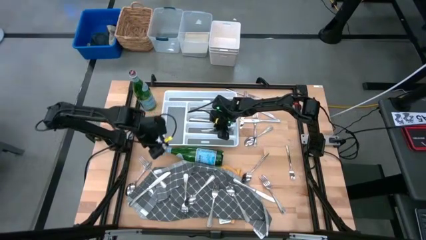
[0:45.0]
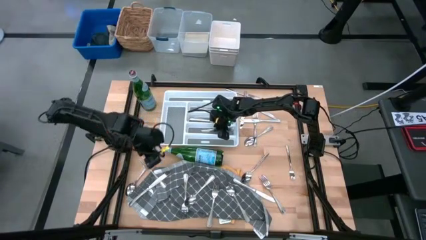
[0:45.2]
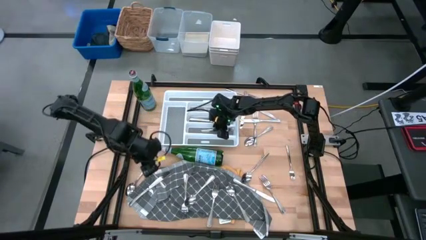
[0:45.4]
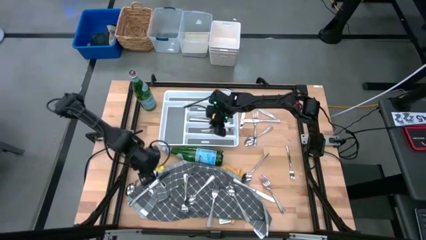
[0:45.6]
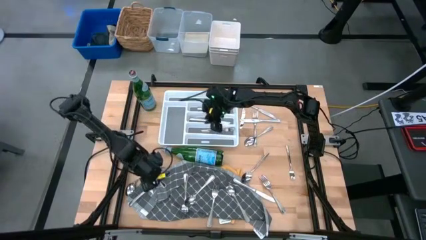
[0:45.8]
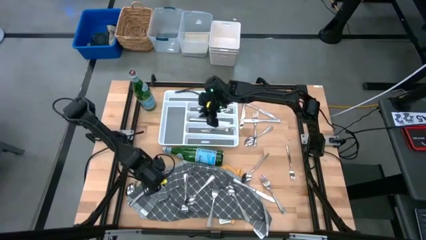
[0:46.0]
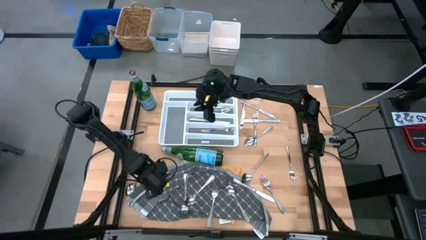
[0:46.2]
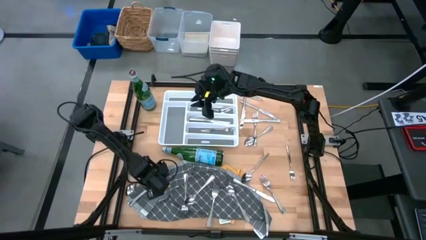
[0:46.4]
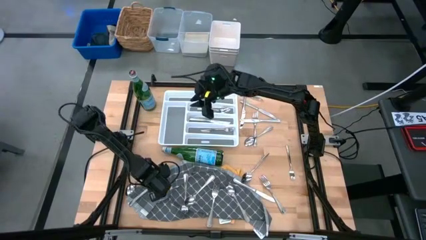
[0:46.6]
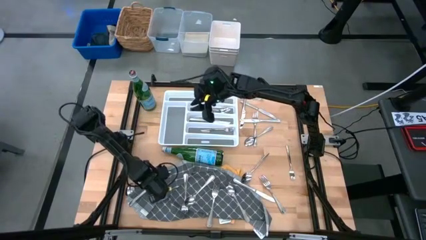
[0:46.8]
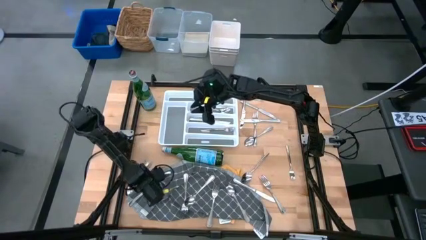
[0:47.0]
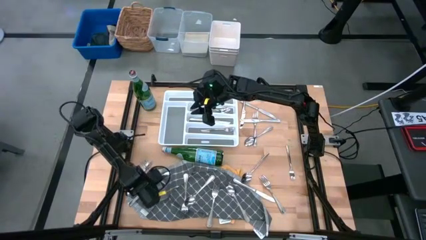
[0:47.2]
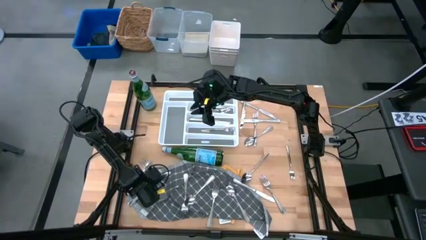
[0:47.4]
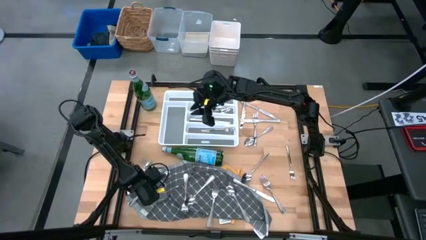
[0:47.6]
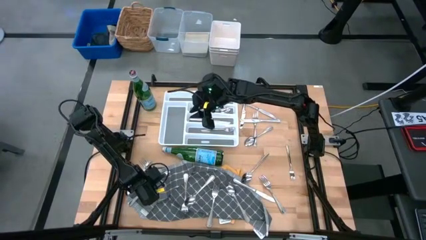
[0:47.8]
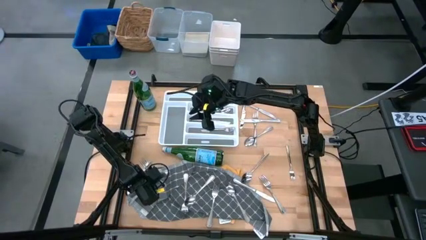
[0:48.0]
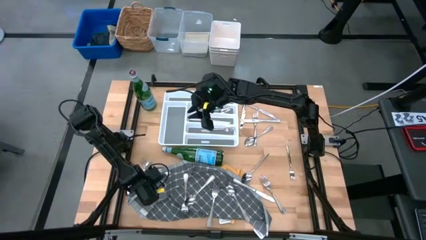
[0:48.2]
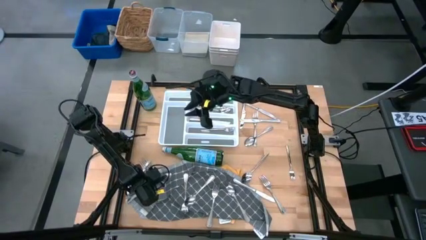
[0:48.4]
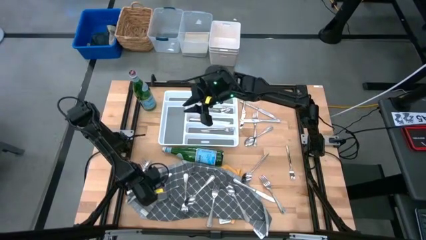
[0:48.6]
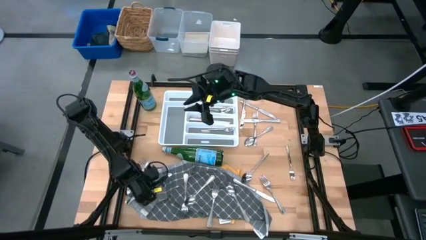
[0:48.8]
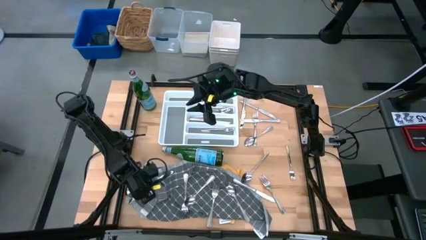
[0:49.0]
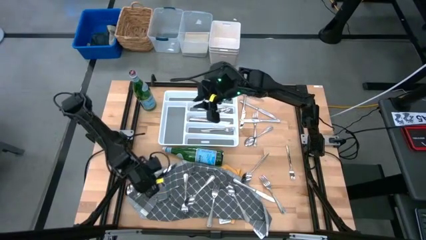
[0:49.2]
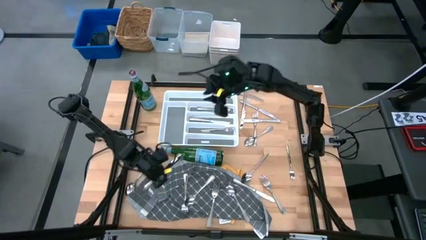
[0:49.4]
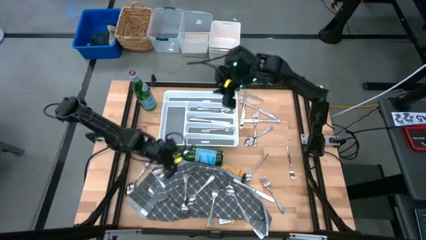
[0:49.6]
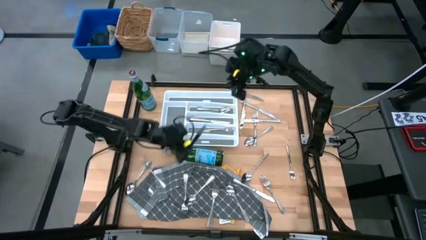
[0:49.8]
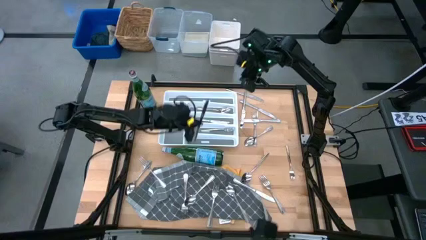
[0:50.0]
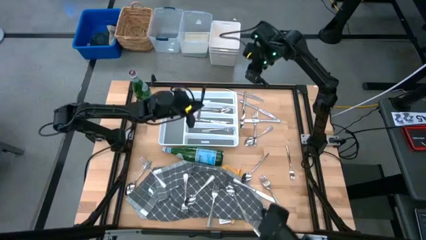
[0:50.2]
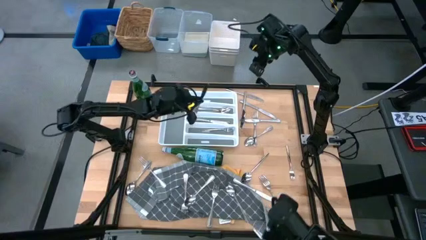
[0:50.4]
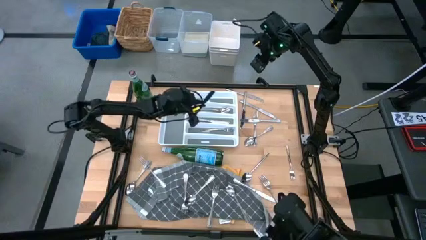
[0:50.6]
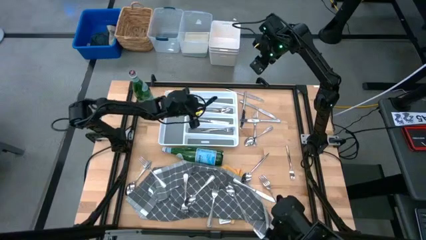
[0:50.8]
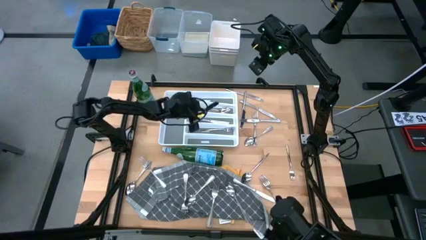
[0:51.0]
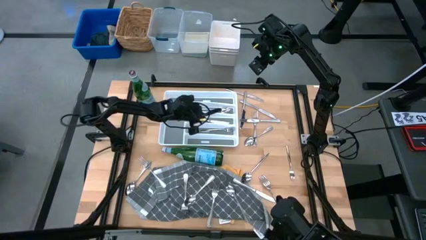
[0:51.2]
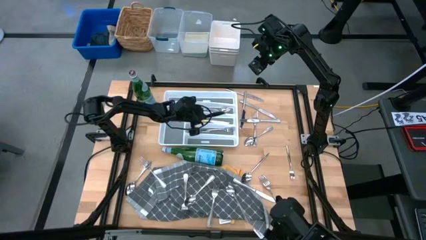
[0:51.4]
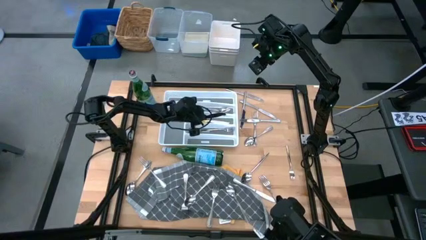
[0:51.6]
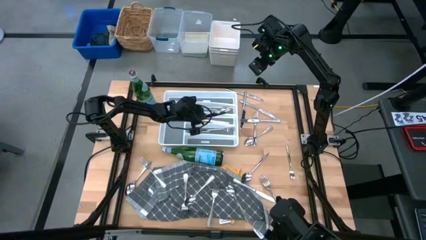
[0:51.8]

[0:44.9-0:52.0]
Task: Sort silverware
Put the silver table knife into the silverware tray

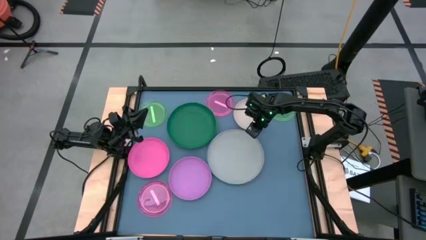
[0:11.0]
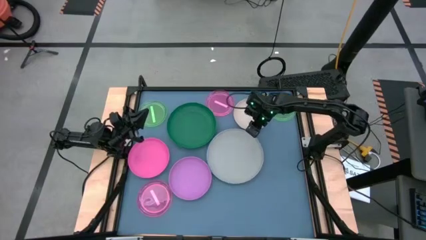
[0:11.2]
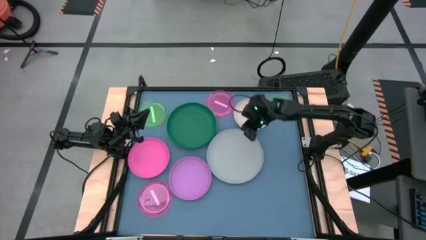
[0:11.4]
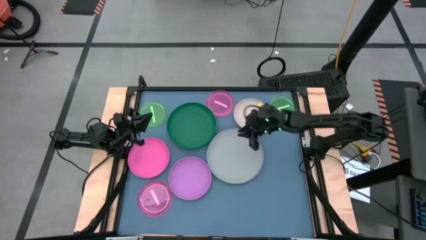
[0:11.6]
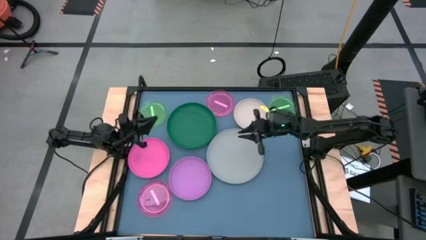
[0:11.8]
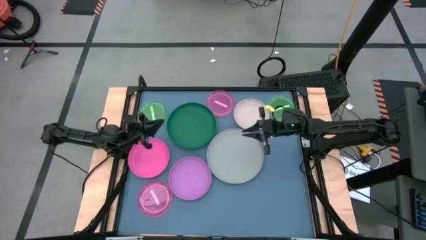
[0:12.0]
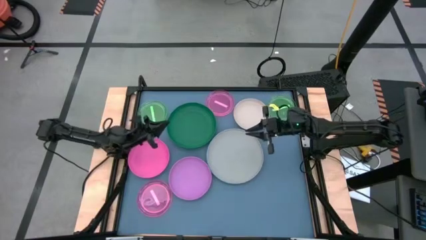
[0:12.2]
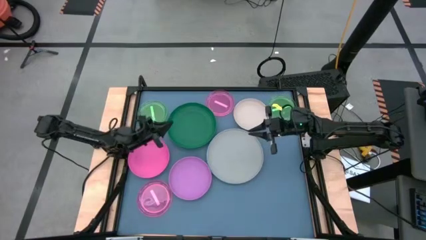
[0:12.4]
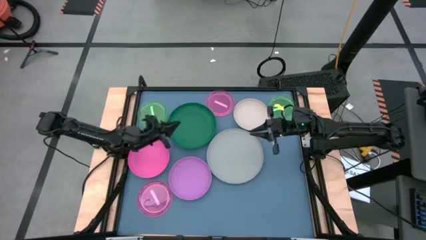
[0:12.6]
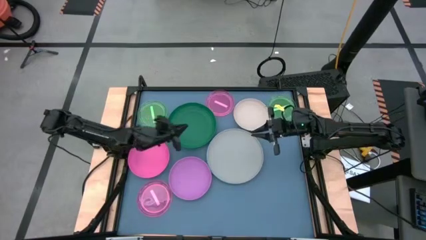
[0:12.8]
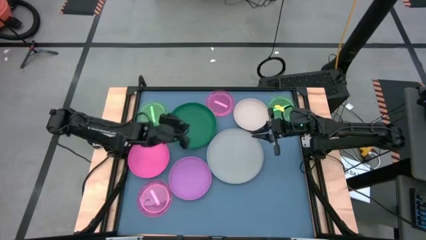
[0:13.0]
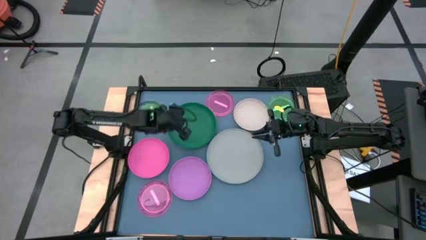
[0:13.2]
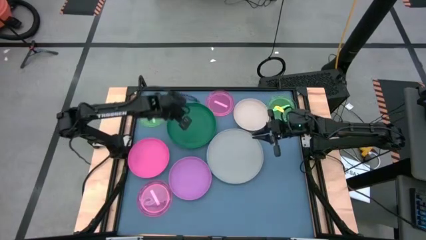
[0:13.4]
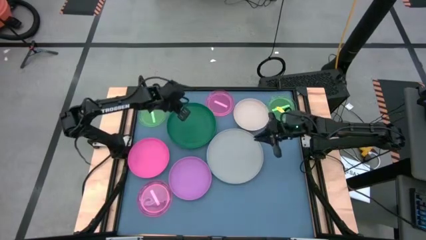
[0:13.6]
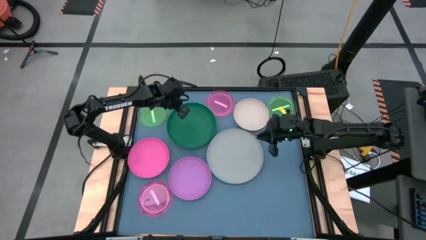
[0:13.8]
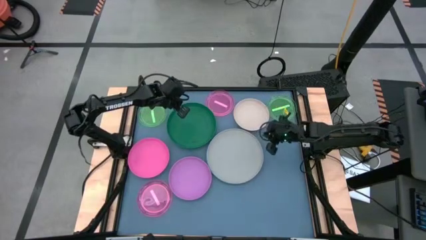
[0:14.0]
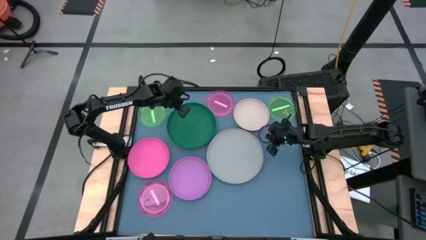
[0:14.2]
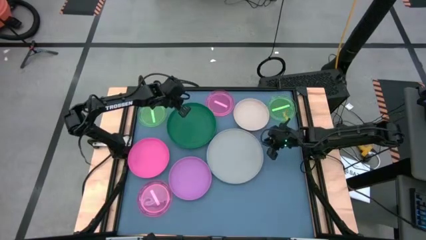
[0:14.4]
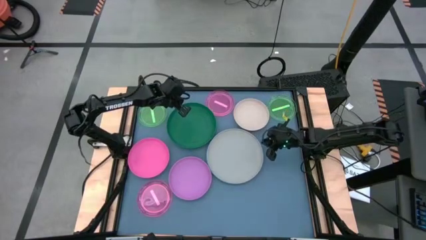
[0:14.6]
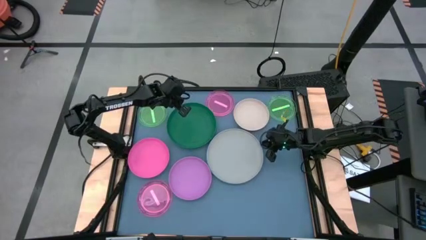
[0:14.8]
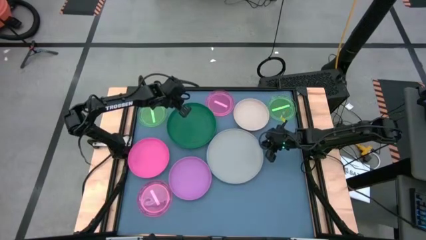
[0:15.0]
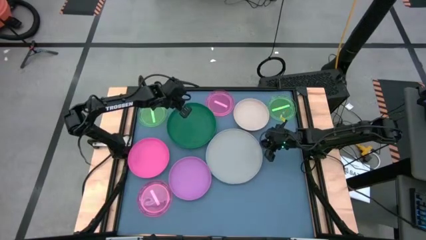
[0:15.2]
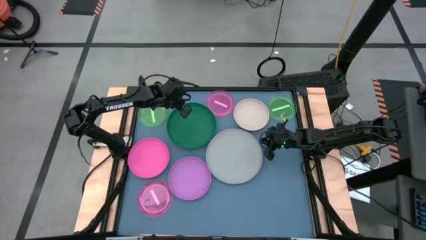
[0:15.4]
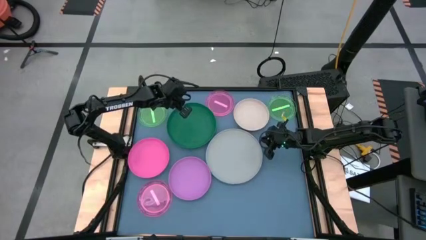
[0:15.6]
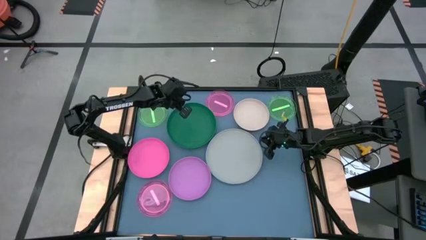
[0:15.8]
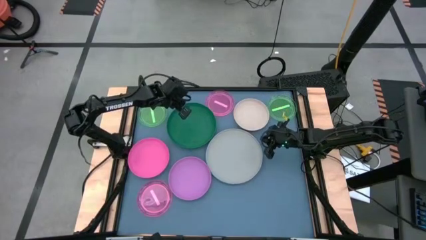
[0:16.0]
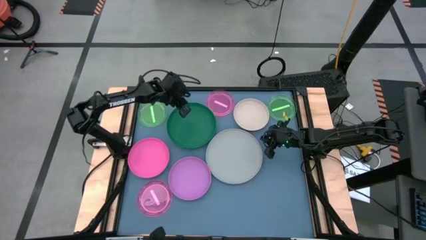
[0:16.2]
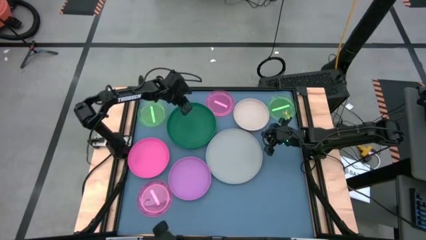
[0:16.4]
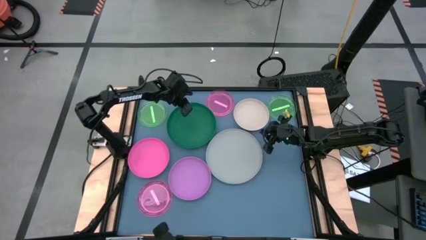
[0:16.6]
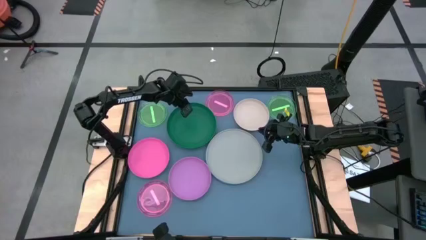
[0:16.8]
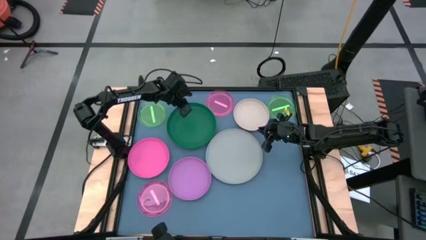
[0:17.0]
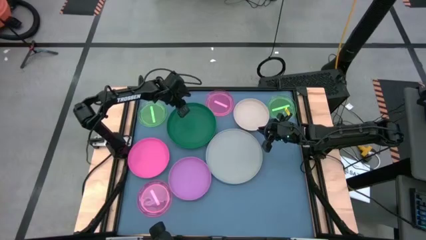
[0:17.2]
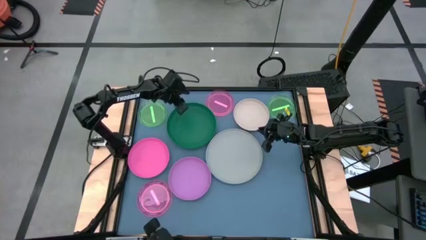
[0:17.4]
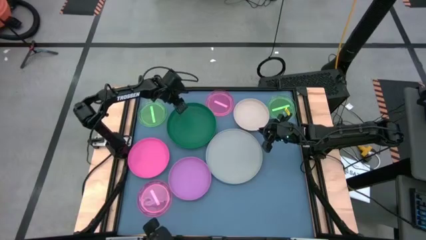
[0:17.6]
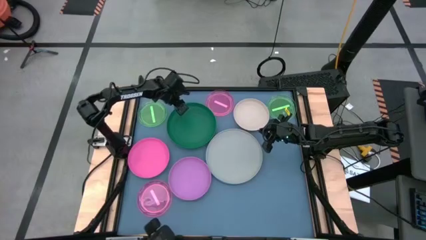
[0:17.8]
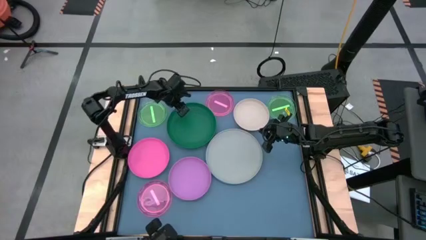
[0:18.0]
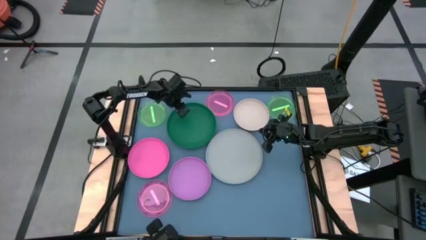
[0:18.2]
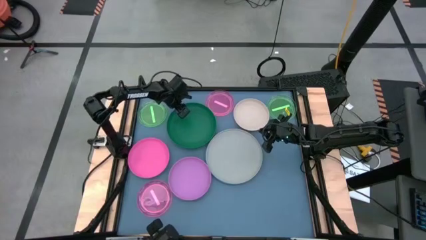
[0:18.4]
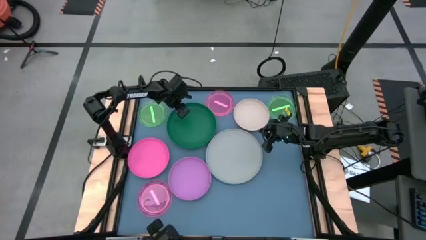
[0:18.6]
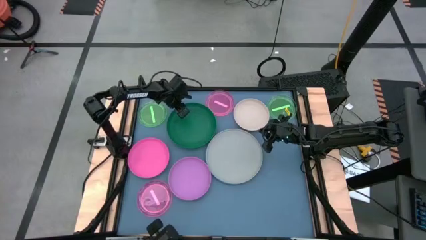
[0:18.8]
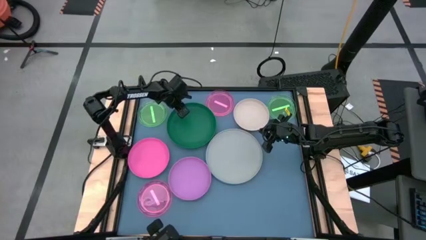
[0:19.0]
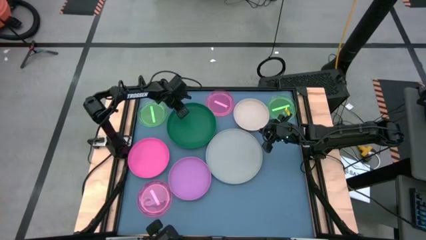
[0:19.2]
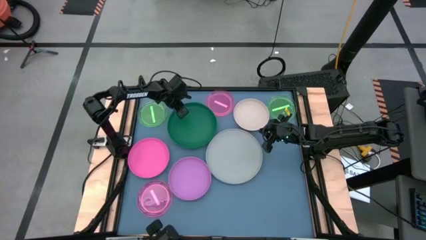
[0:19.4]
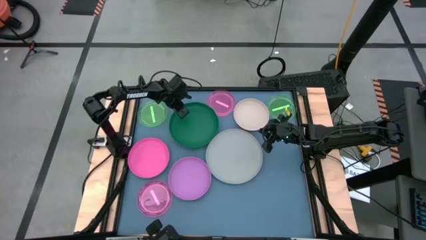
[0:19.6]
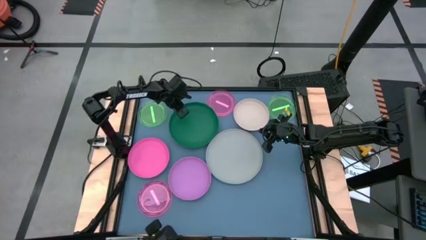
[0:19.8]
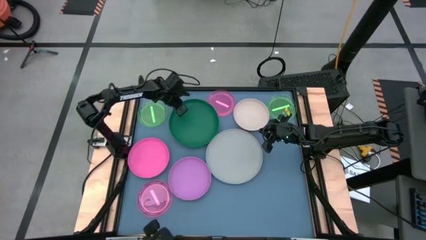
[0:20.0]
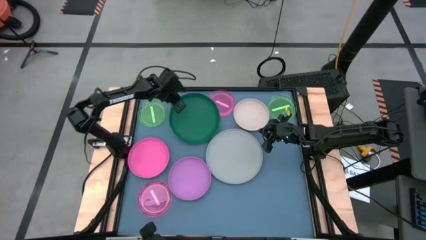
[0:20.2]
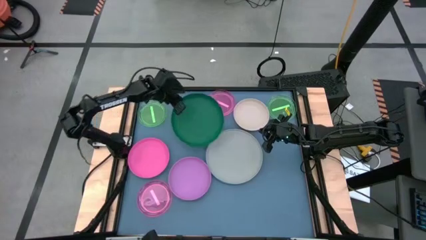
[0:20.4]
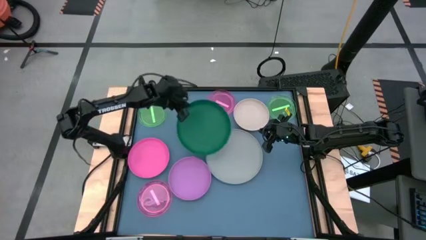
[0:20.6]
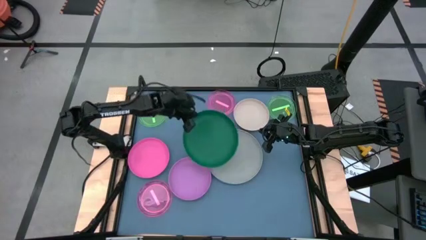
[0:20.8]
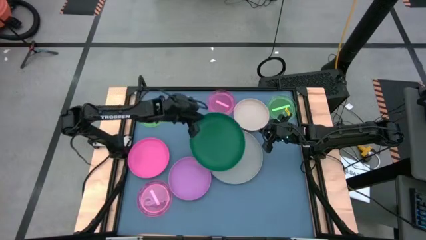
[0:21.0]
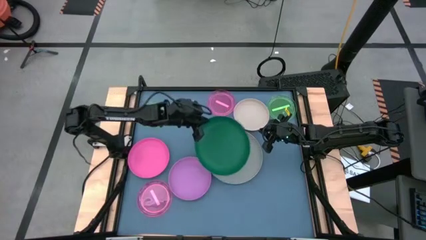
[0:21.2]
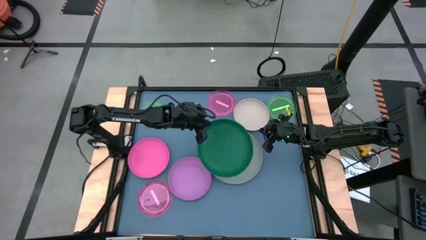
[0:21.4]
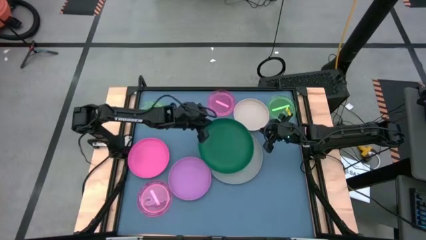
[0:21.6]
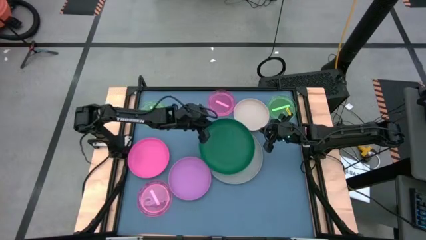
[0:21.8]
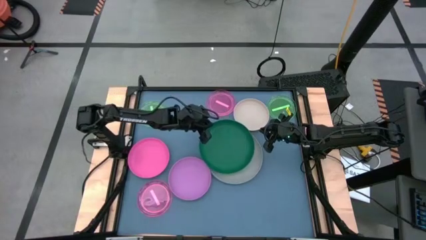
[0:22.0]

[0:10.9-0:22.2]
Task: Stack plastic plates
Stack the green plate on top of the gray plate
